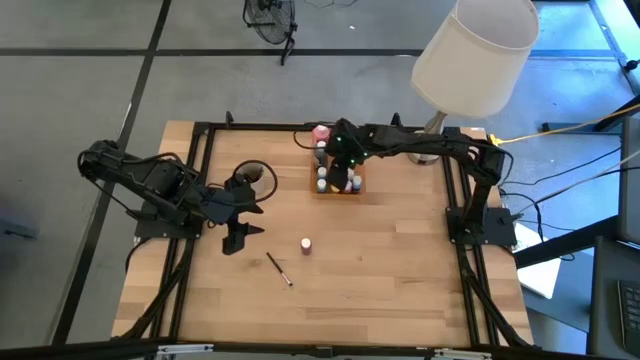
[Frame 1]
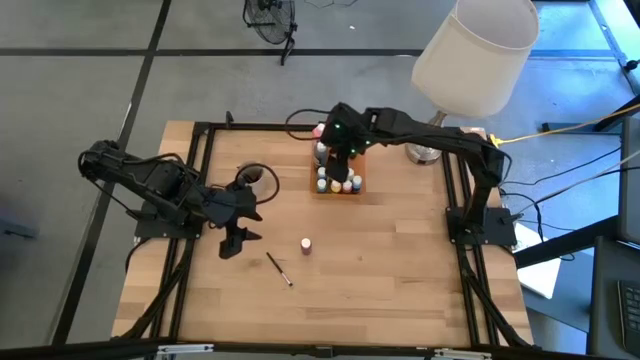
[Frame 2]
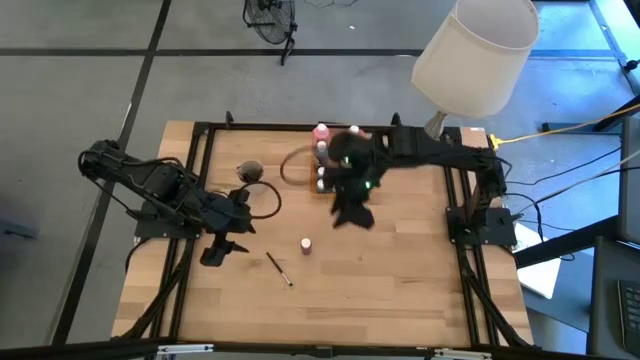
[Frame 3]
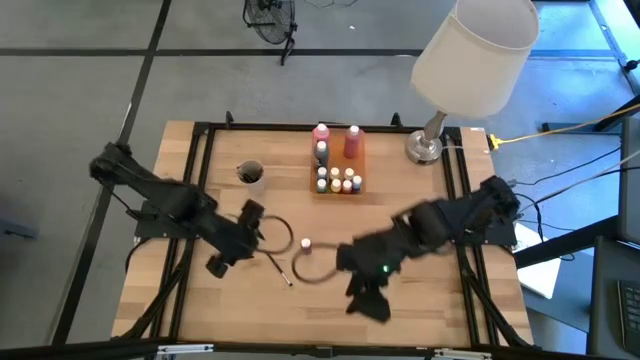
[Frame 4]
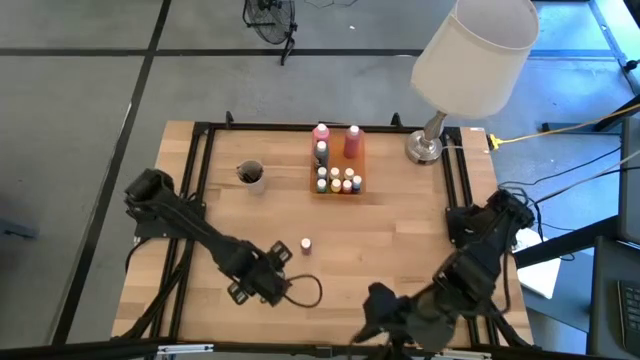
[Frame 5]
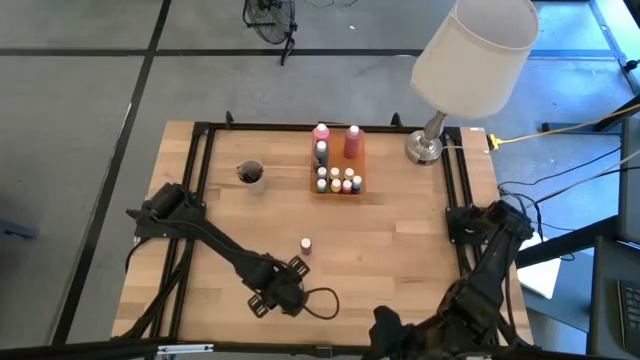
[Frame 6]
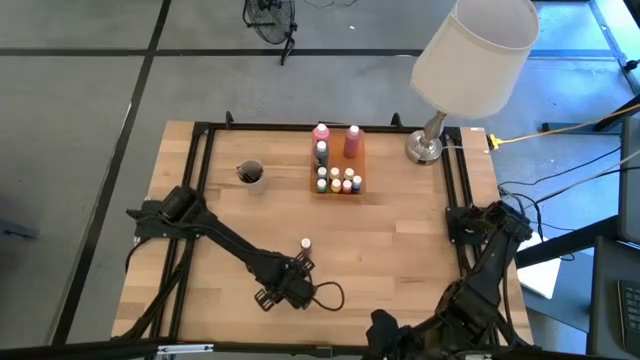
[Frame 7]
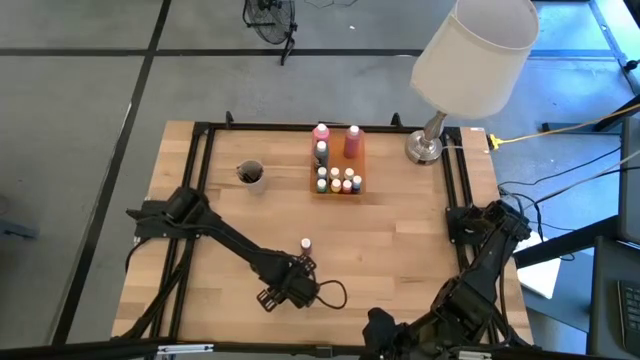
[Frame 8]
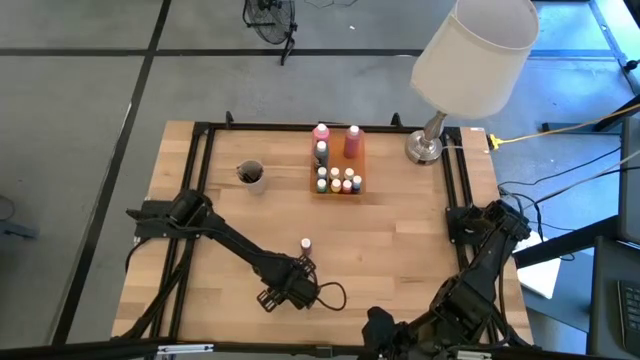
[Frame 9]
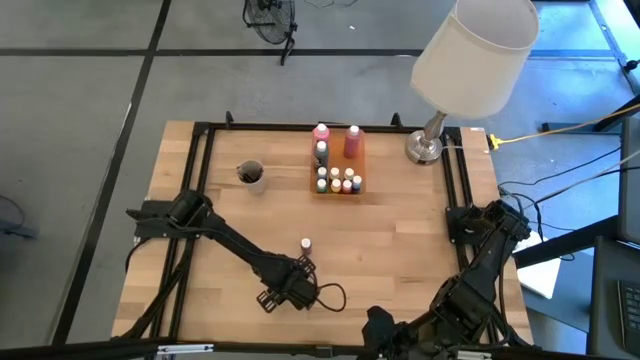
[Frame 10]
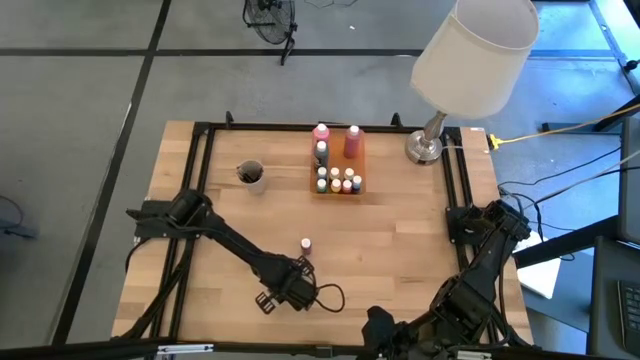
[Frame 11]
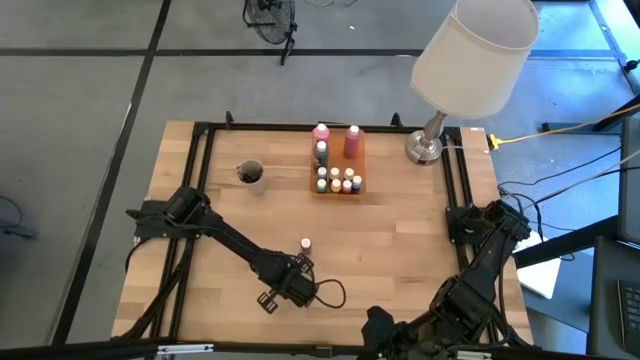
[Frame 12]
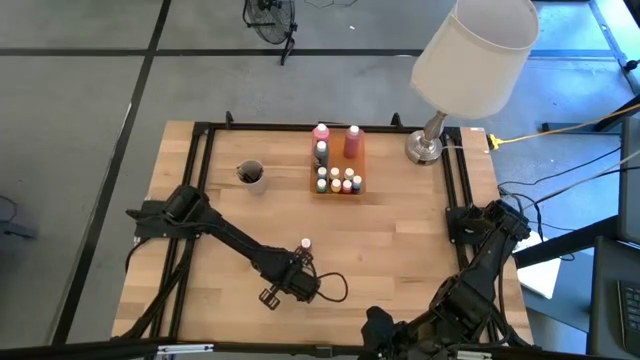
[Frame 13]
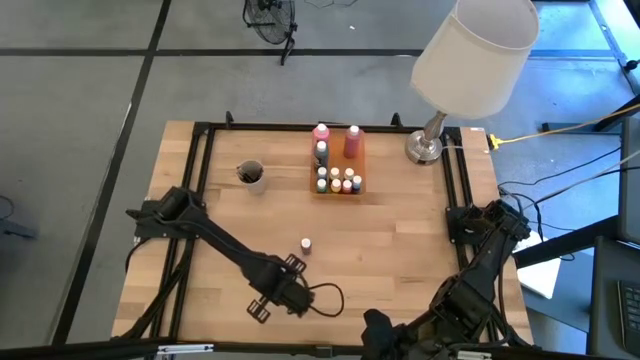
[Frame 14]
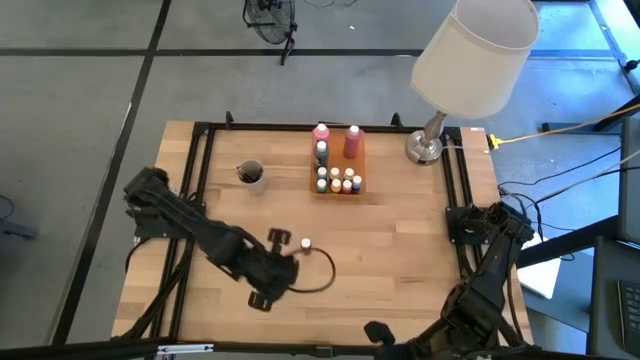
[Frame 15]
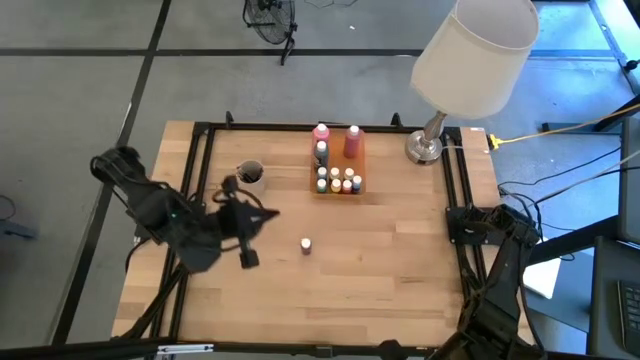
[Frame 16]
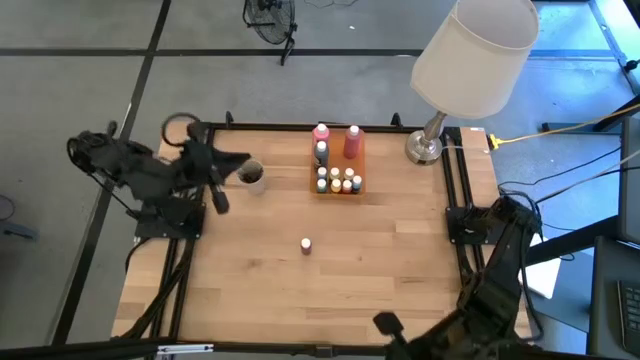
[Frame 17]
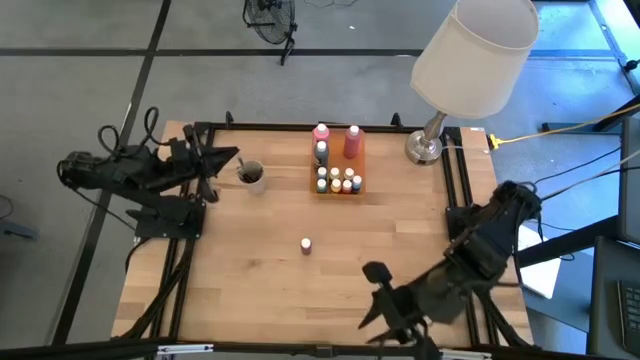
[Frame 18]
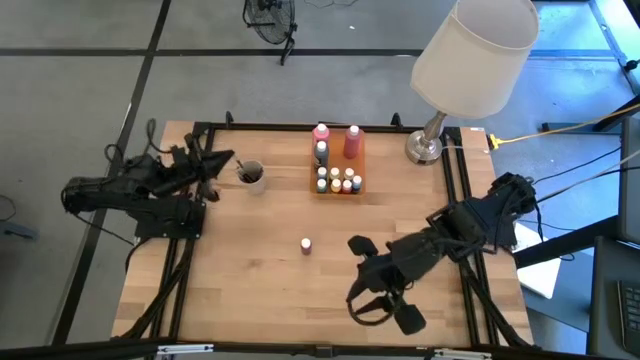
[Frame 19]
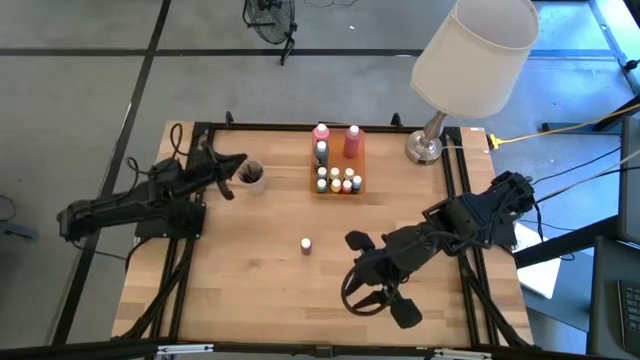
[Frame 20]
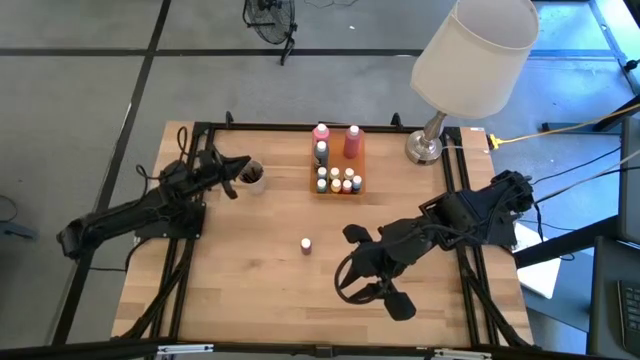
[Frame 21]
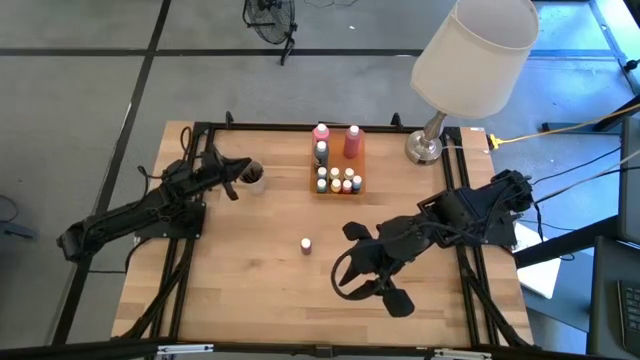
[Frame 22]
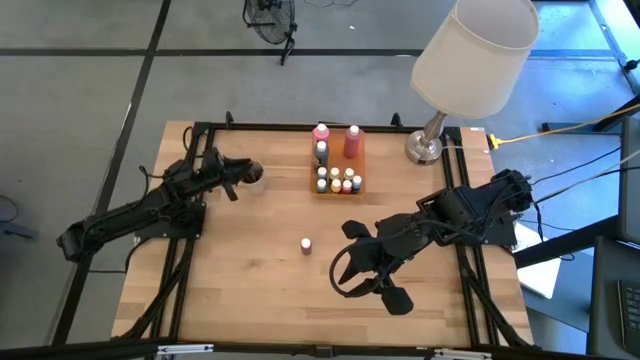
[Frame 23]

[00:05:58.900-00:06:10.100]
Task: Pick & Place Paint Supplies
Put the silver paint brush into the white cup

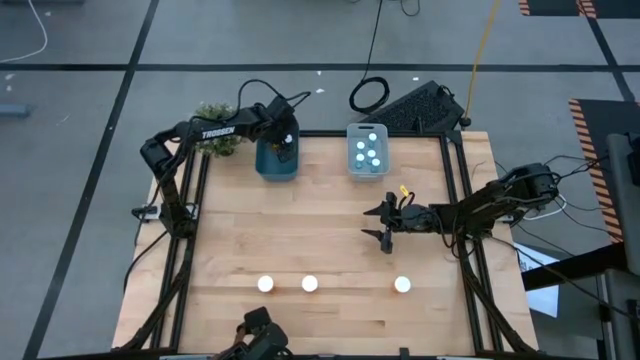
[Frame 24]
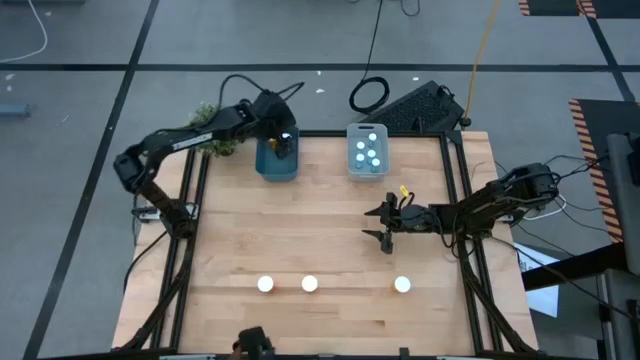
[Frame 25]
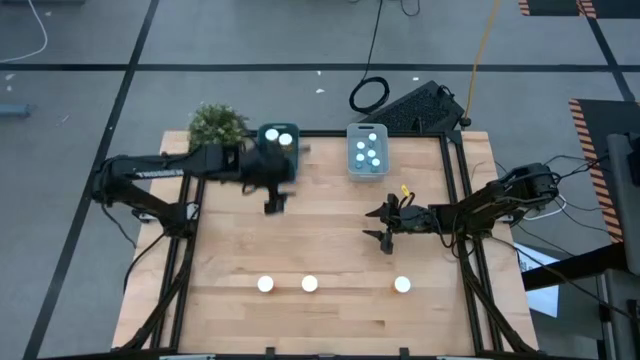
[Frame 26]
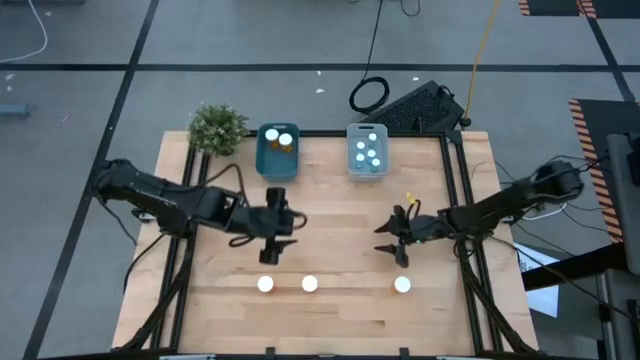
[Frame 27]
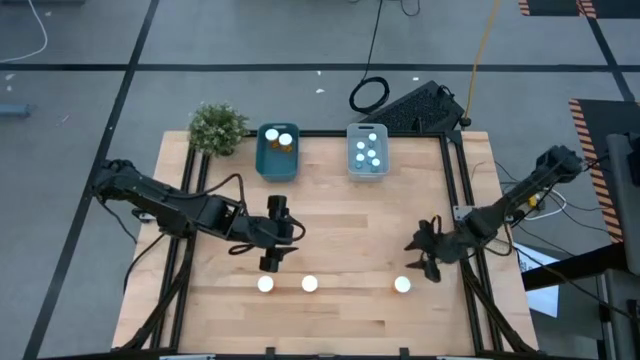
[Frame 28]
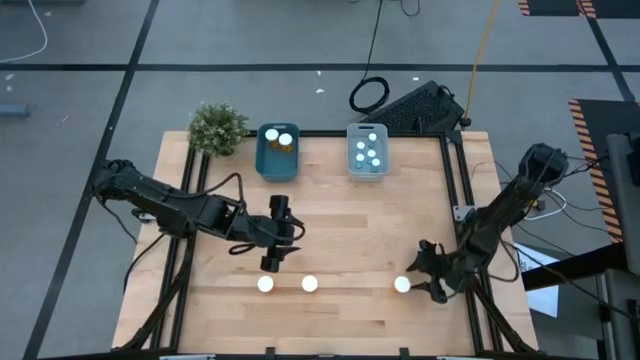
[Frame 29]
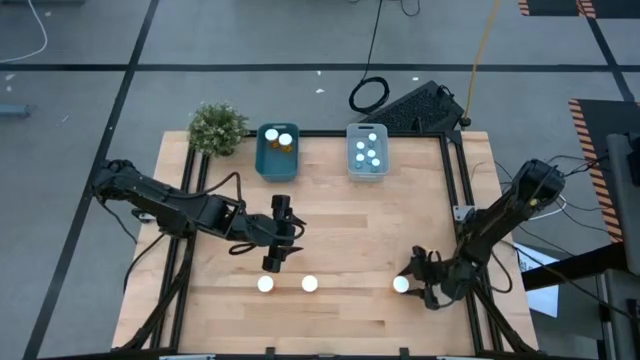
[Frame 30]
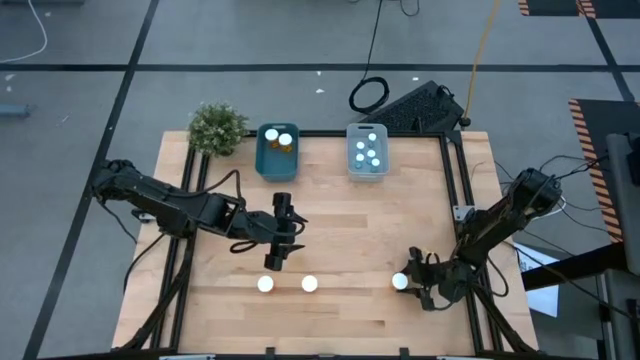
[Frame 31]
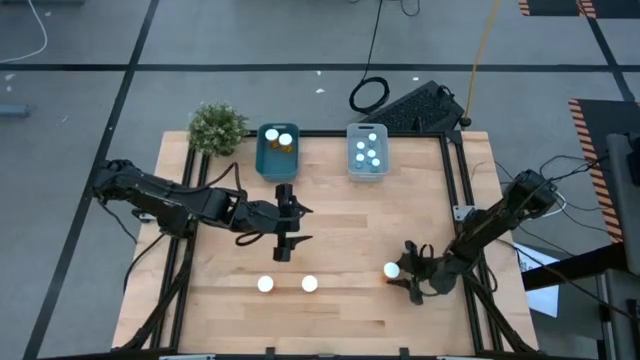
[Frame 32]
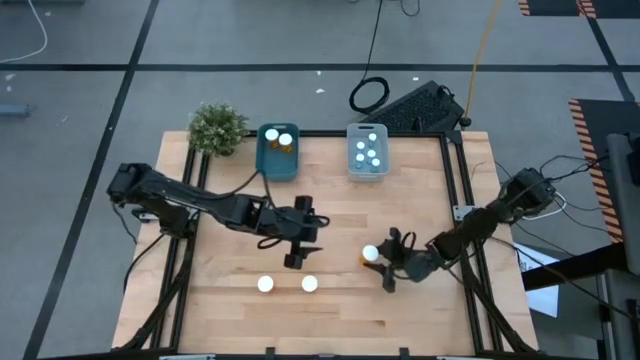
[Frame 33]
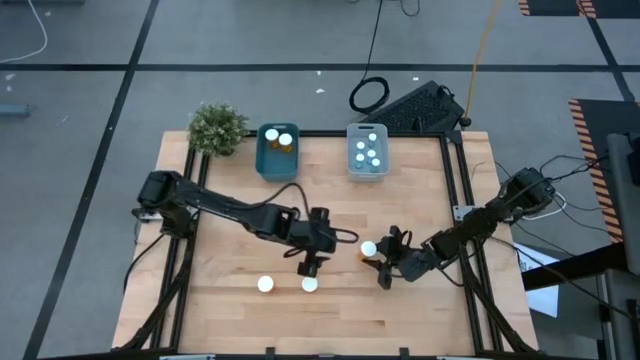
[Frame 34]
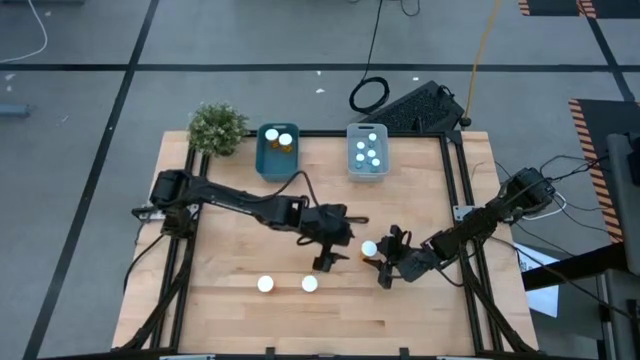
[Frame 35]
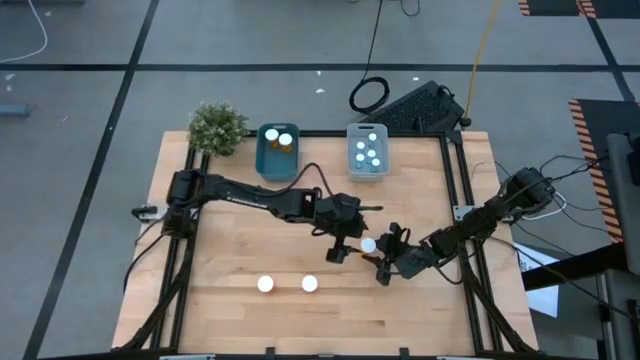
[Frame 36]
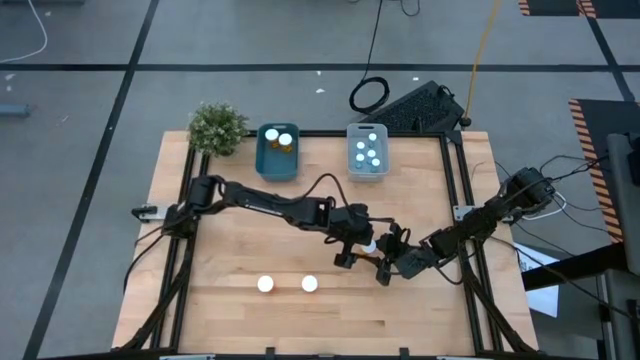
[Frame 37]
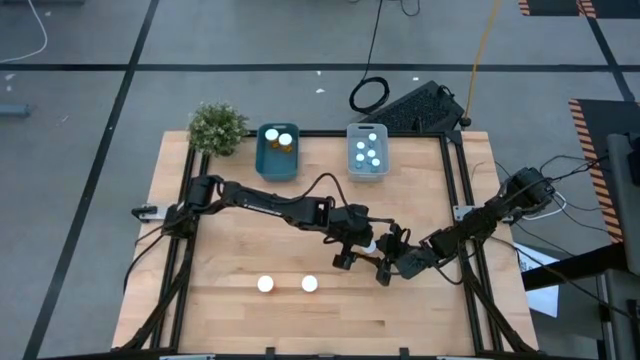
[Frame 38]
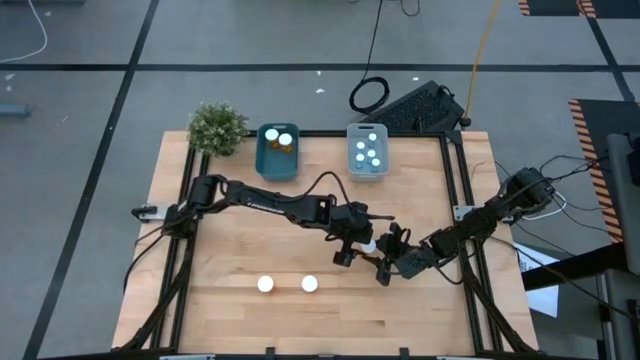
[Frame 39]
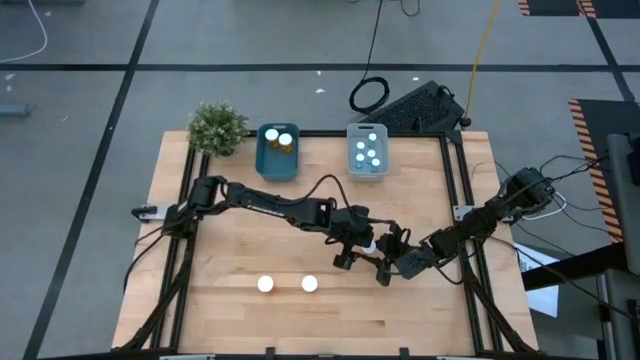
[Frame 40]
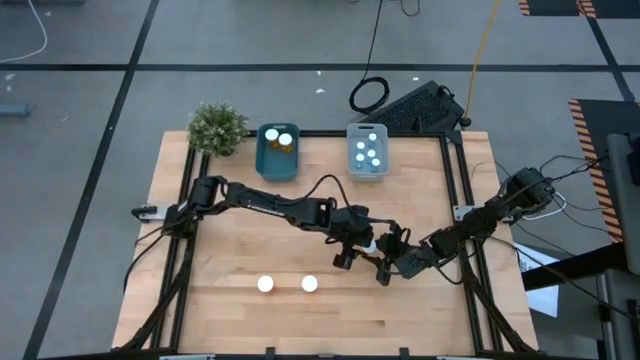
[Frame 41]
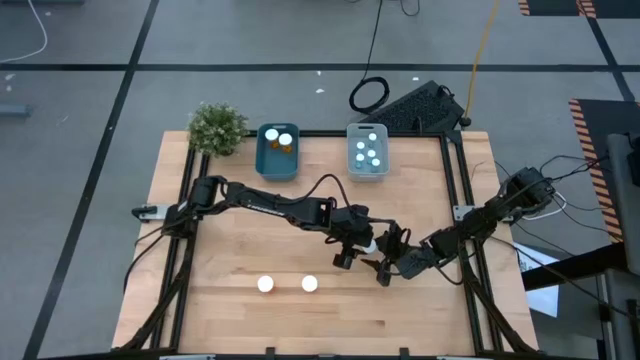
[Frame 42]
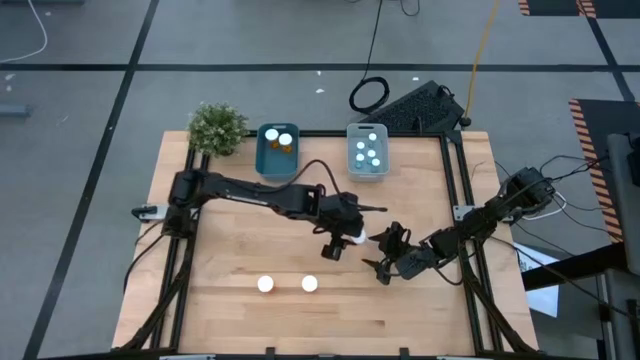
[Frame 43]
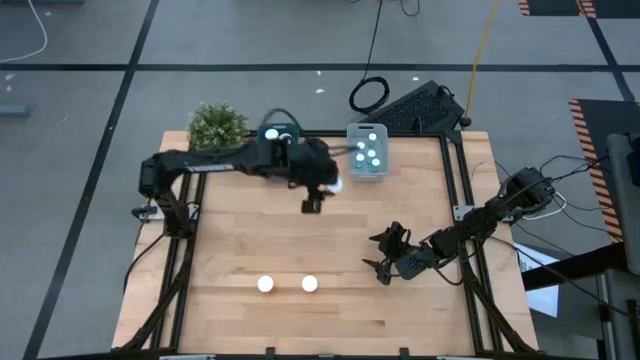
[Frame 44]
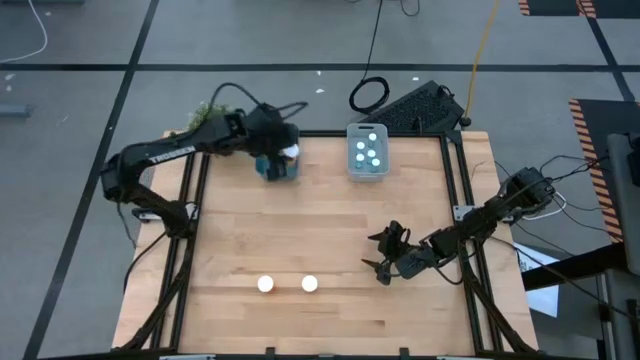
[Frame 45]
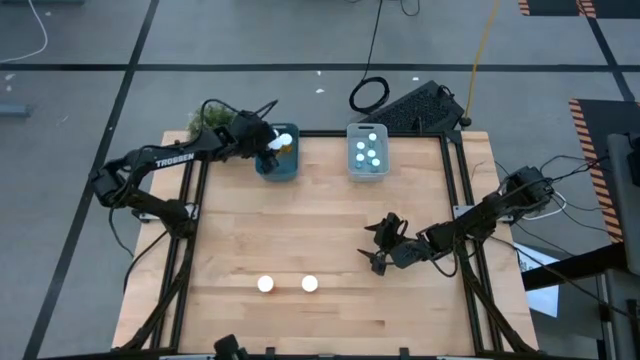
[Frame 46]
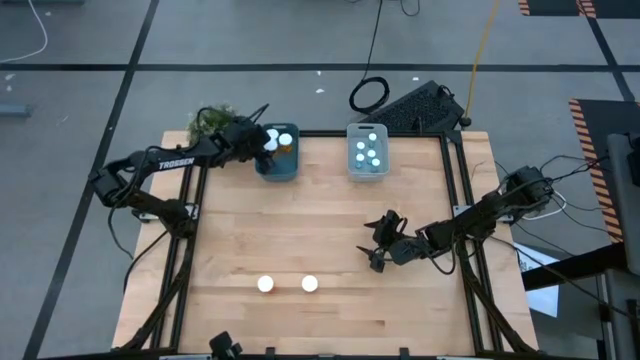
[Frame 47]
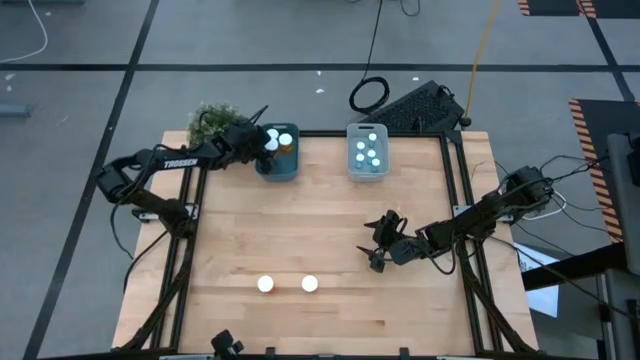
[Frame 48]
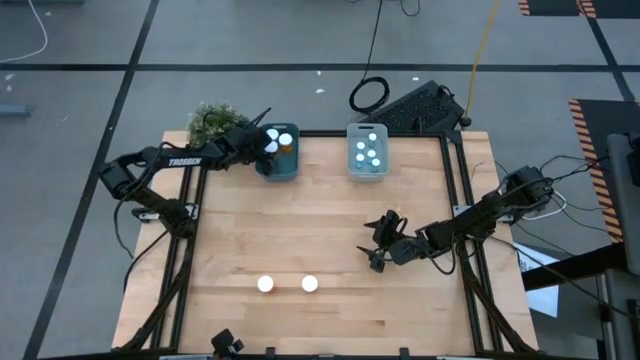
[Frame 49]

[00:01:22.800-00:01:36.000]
Task: Pick and place medicine bottles into bin by pill shape (circle, oval)
Put the orange pill bottle into the green bin
